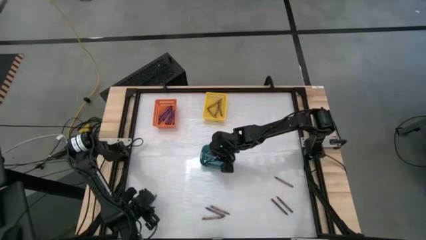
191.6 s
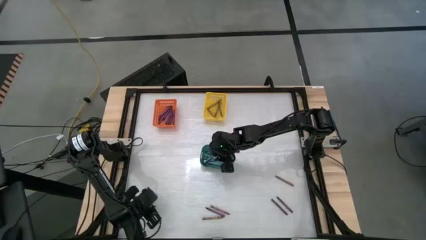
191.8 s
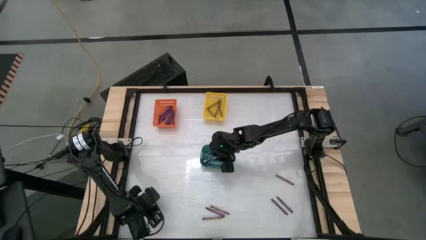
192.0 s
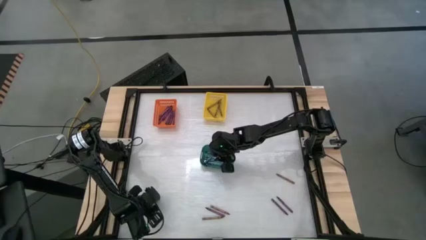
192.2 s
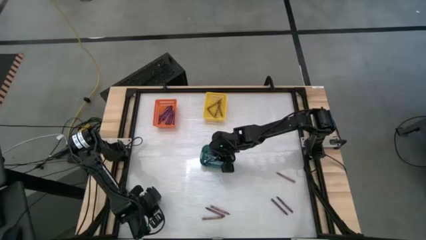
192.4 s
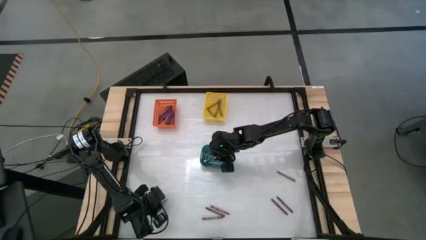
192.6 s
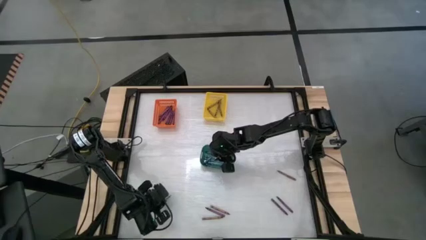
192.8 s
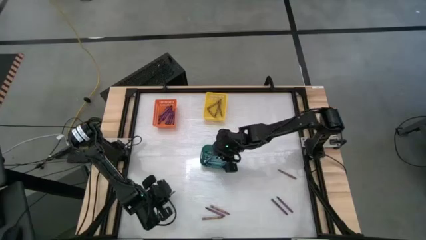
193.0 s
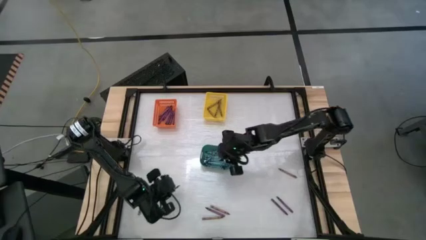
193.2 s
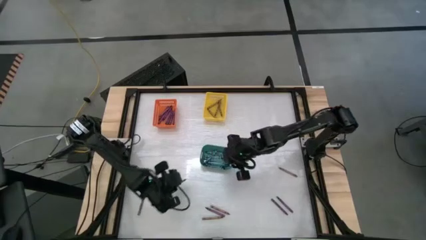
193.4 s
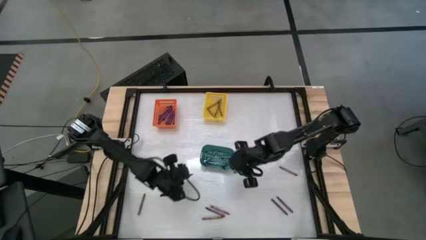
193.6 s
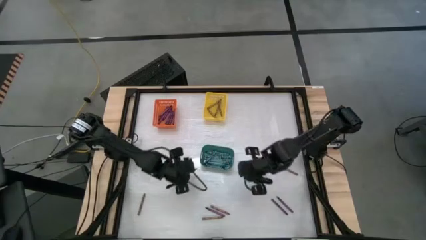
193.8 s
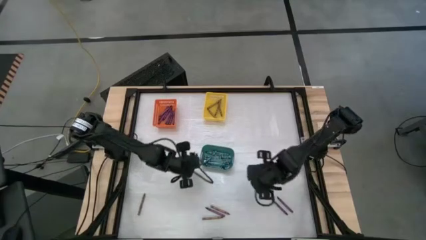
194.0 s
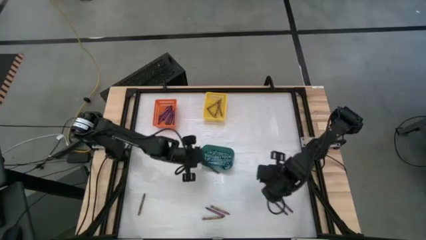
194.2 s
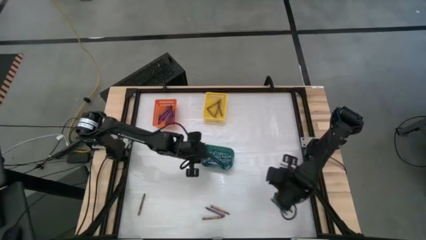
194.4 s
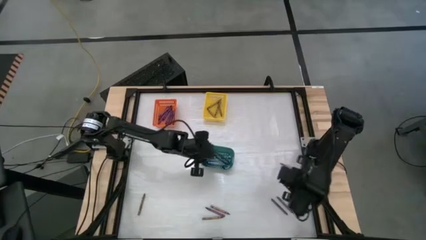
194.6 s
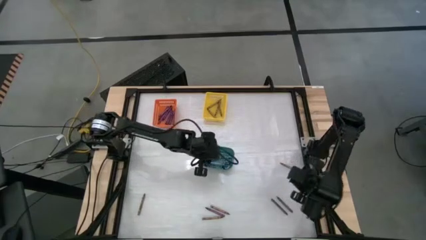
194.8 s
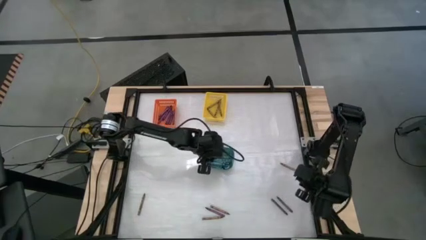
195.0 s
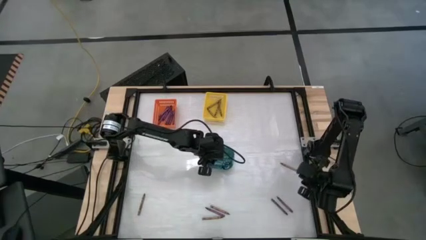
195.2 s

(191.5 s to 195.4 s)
Task: Sort crayons
Put the blue crayon into the blue bin

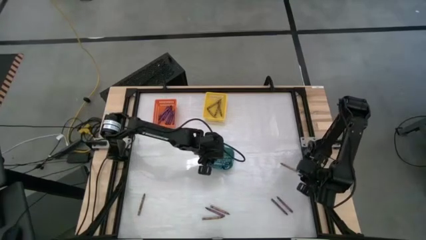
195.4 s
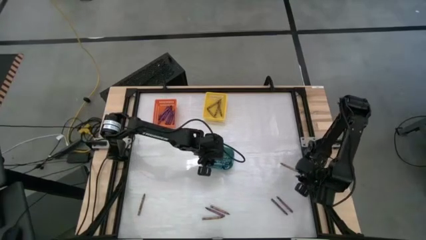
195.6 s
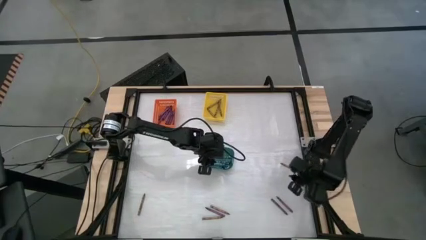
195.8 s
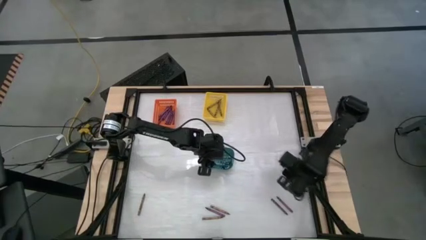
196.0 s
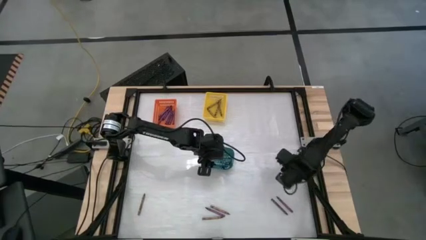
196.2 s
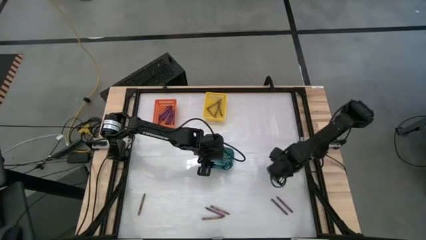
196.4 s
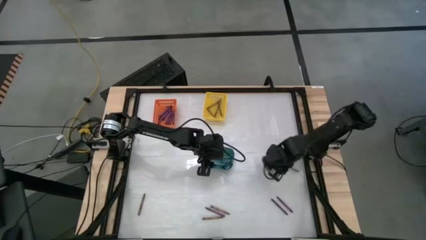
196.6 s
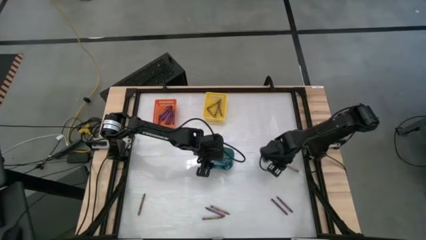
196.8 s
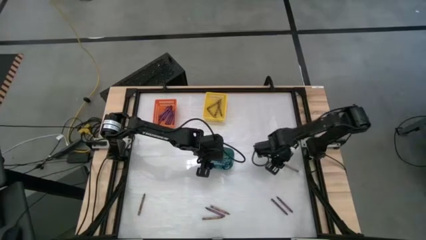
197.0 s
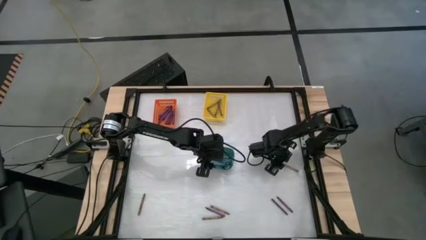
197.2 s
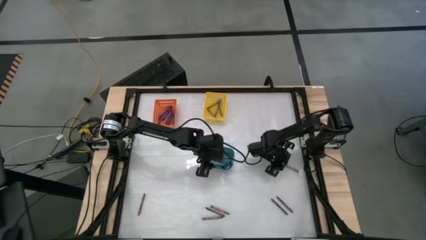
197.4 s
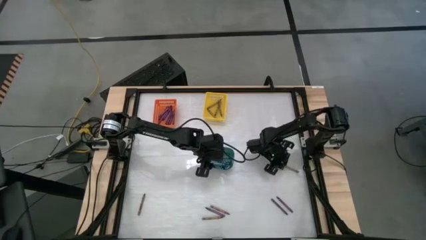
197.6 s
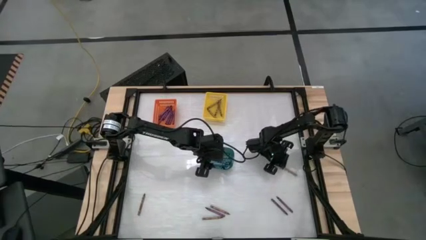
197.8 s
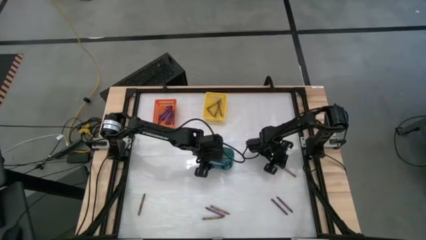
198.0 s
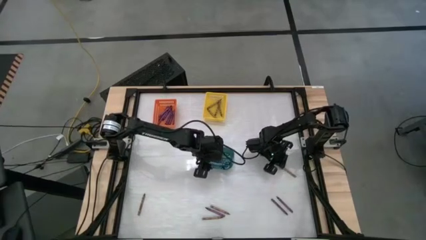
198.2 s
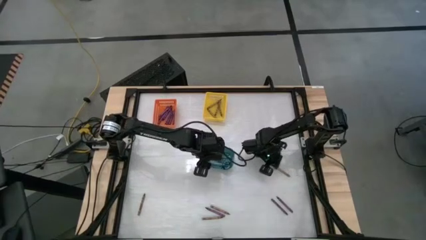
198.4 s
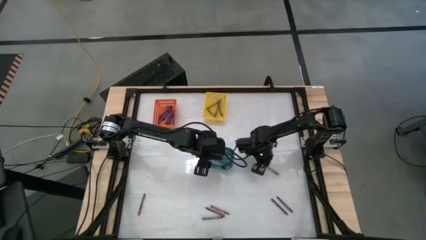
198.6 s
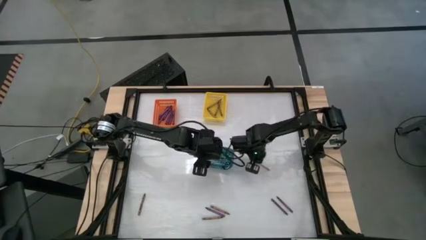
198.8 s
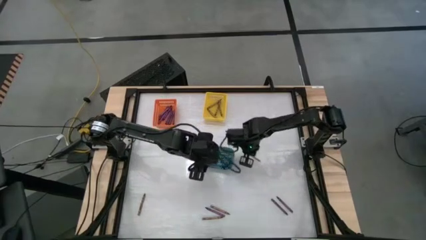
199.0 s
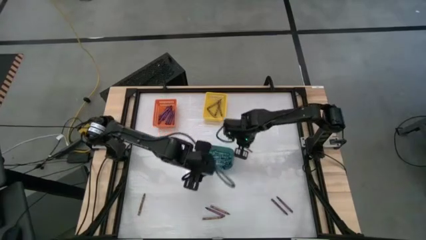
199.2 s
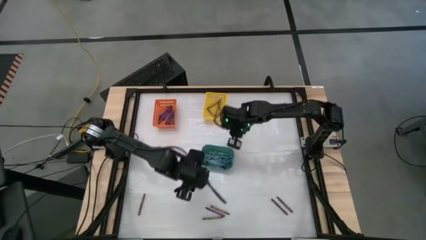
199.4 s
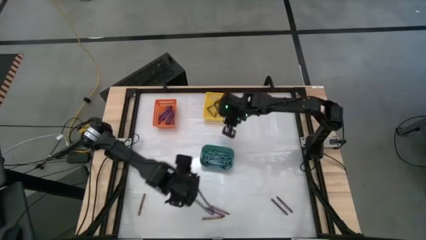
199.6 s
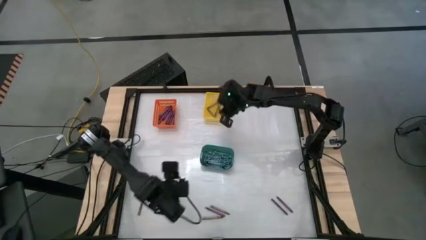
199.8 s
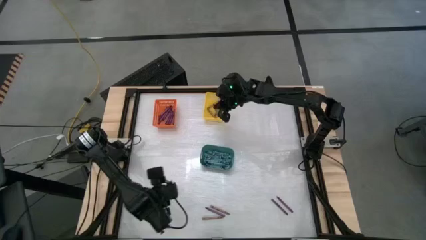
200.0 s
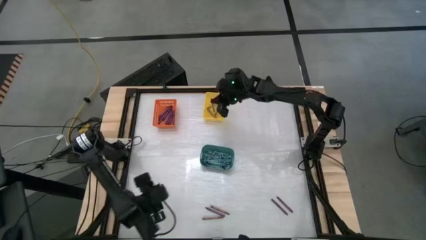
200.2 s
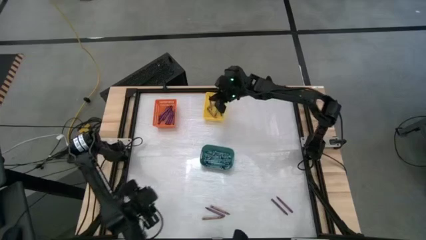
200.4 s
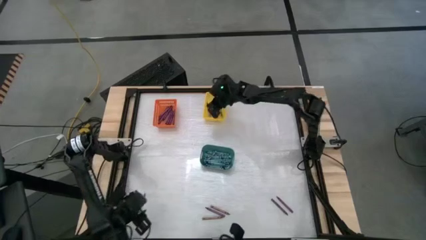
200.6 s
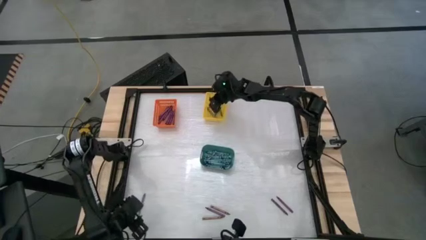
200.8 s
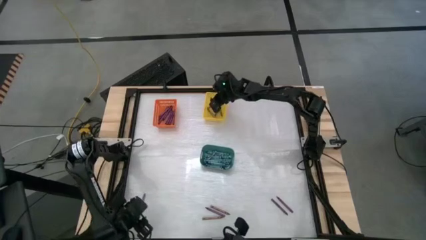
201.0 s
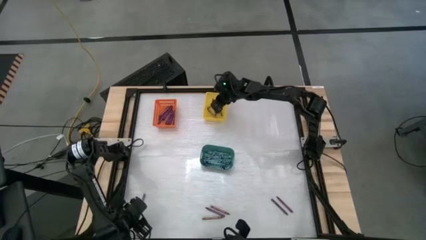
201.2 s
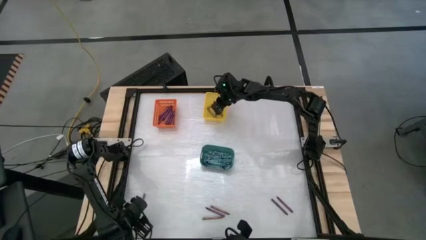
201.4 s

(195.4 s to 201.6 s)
Put the brown crayon into the yellow bin

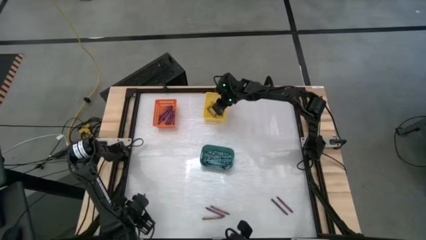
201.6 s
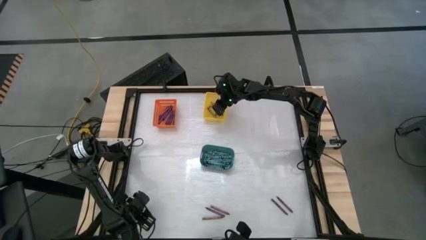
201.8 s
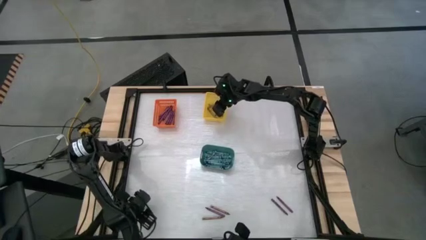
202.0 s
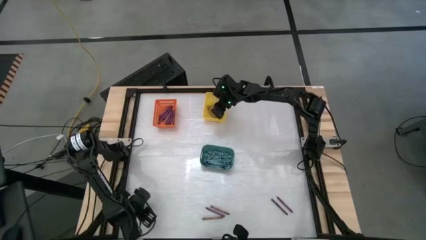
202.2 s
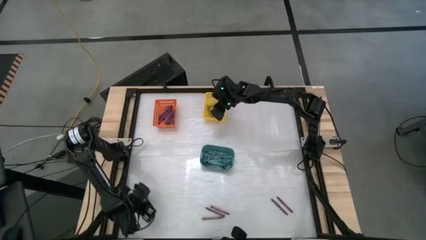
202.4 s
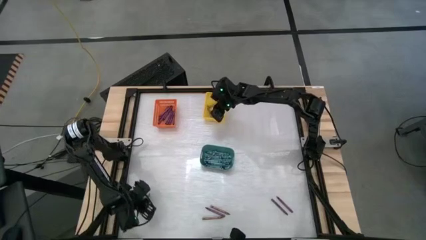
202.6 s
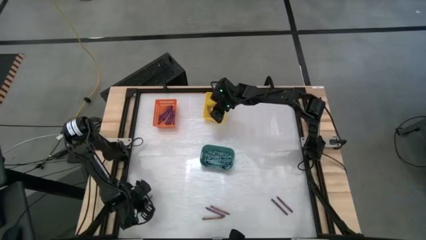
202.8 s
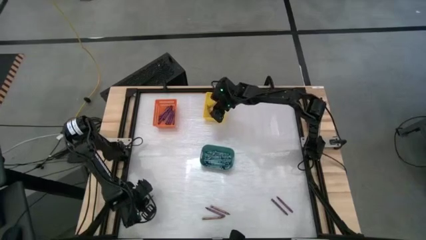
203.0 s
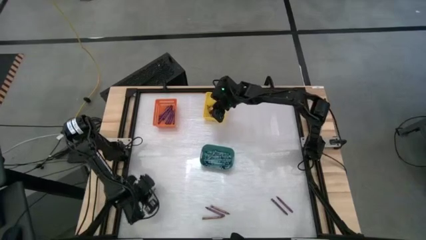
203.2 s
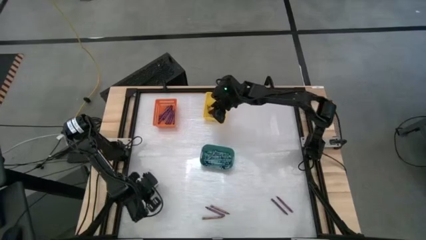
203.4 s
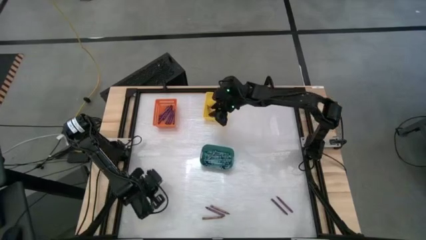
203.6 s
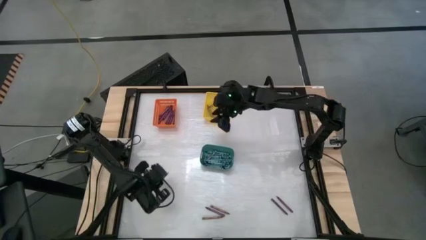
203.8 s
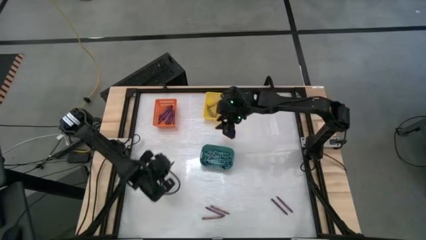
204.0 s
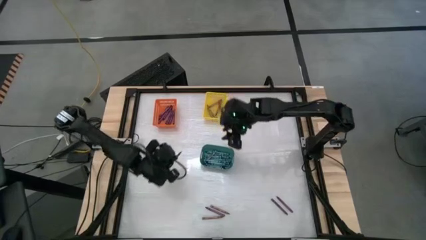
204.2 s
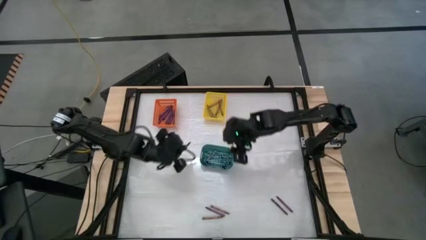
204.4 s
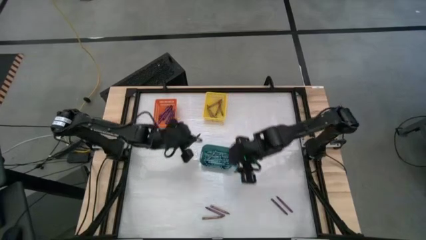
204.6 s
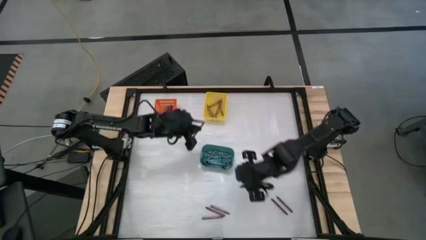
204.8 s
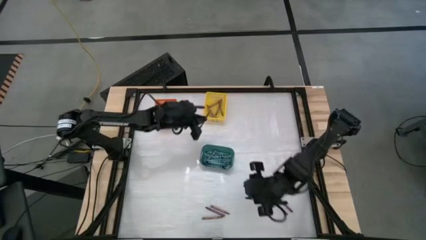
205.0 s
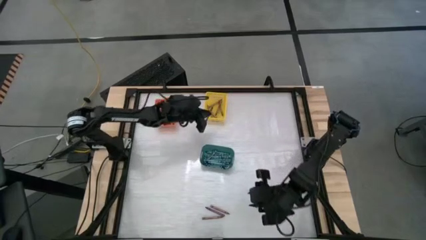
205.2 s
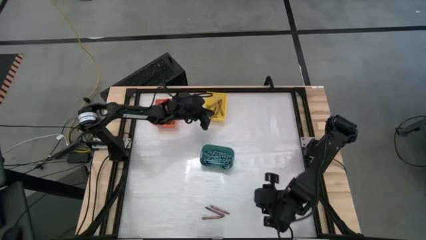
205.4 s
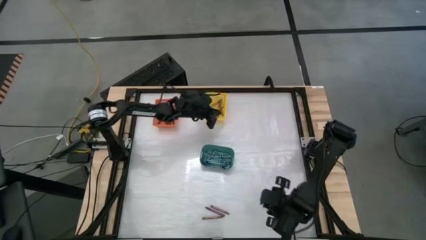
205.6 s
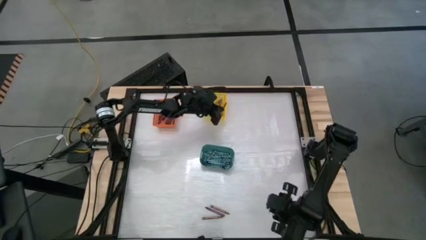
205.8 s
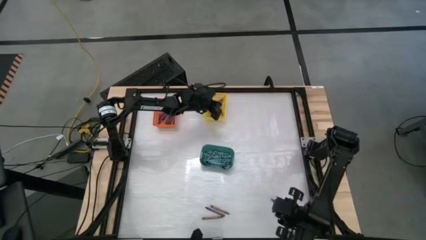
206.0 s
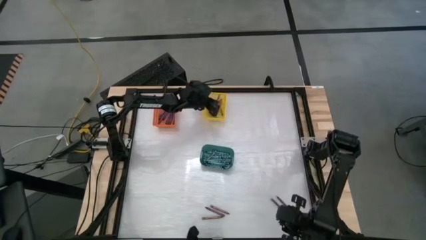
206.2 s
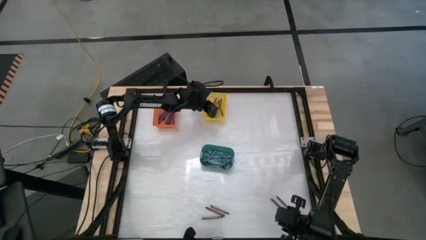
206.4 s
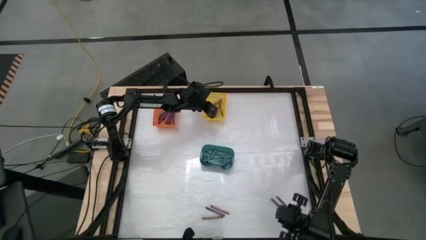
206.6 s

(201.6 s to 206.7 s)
Put the brown crayon into the yellow bin

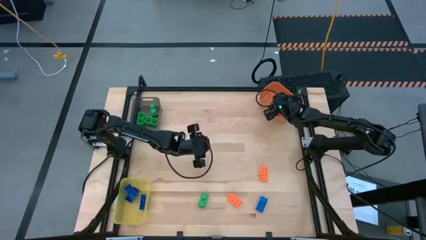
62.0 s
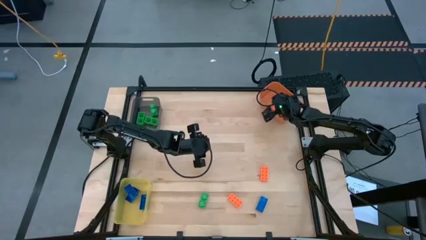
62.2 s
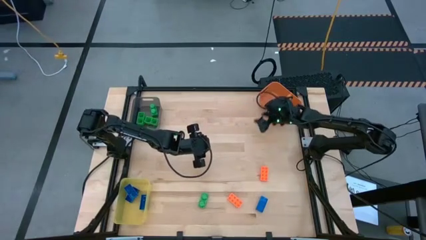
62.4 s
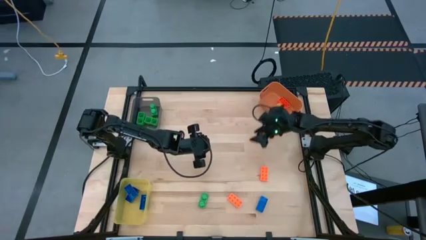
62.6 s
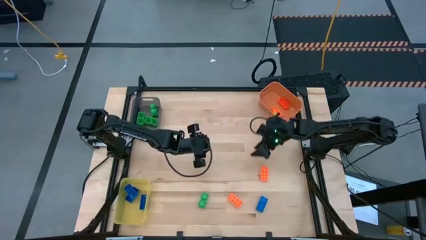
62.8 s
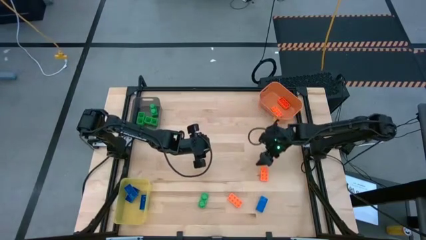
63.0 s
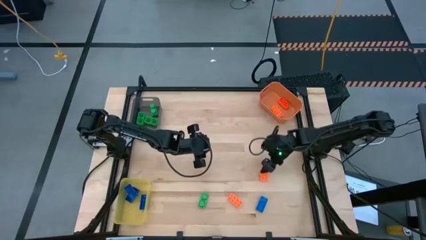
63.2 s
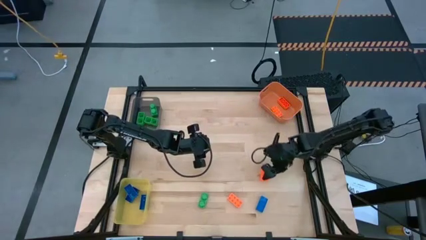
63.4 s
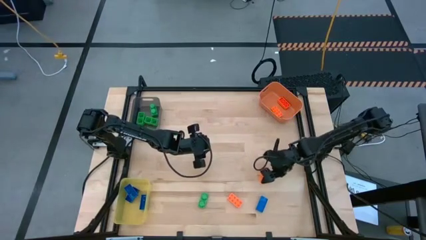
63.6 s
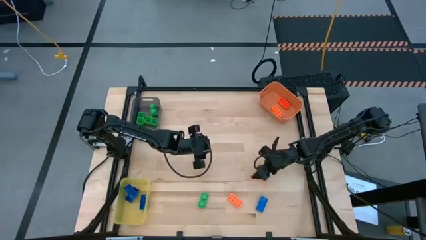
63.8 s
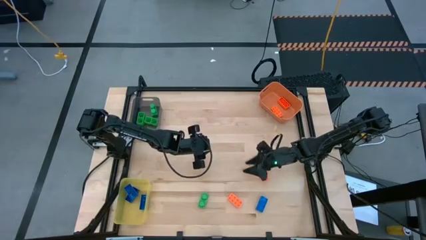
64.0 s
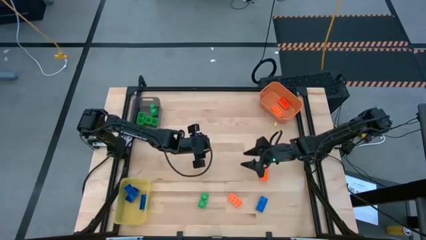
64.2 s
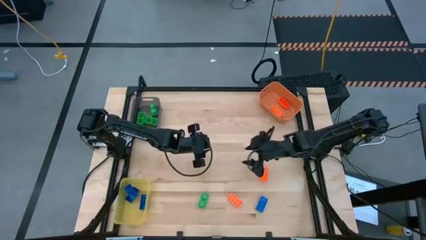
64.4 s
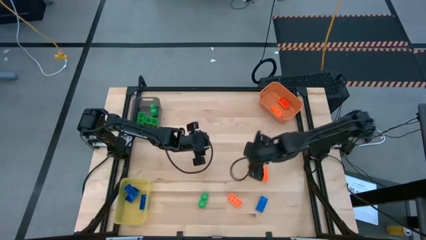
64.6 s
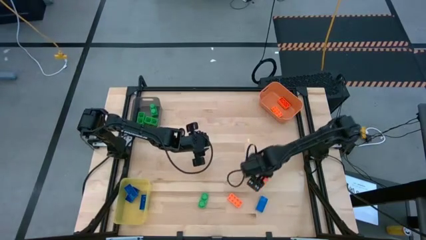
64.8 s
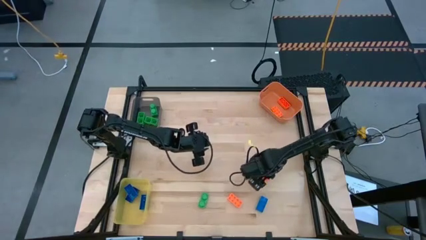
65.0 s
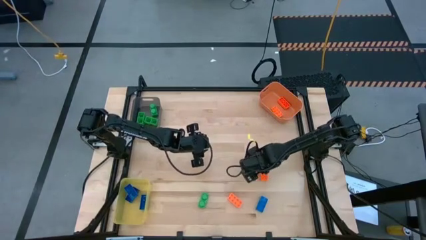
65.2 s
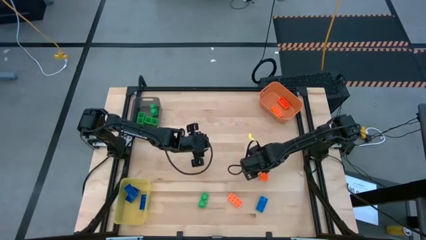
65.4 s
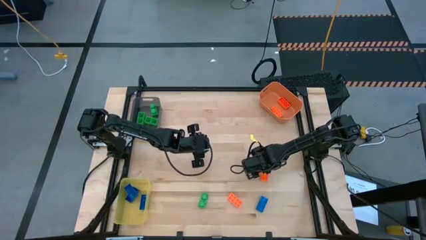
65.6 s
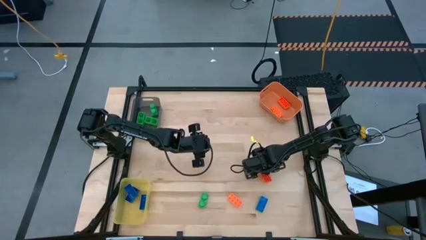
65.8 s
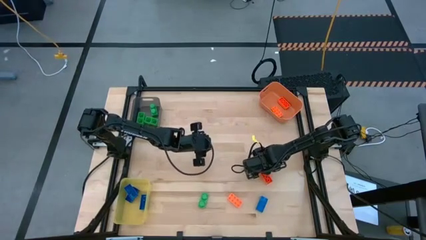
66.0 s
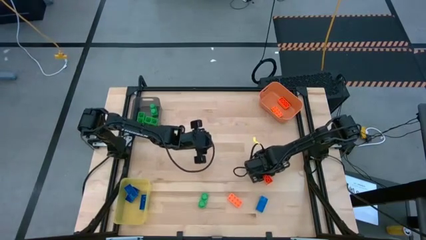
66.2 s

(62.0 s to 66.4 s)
Task: Sort & place blocks by color
Put the orange game piece into the orange bin
